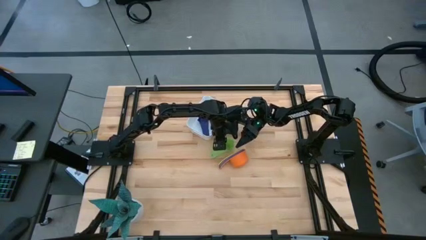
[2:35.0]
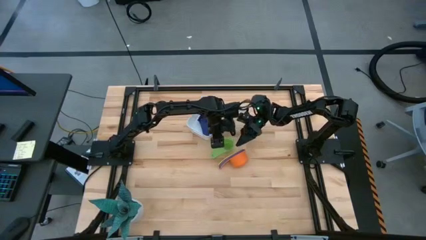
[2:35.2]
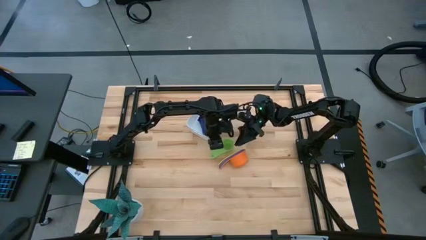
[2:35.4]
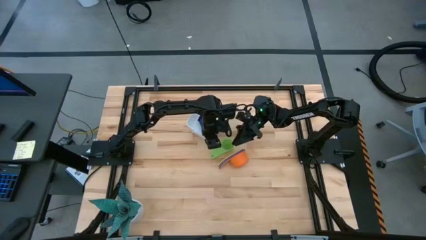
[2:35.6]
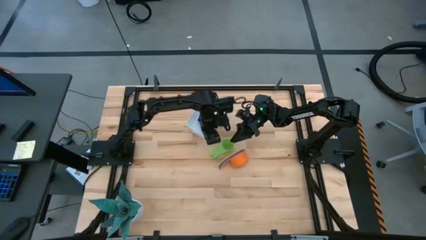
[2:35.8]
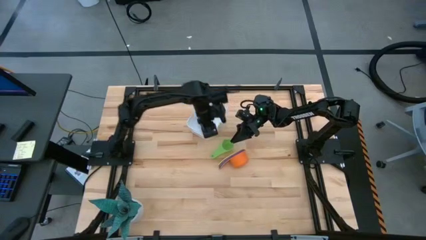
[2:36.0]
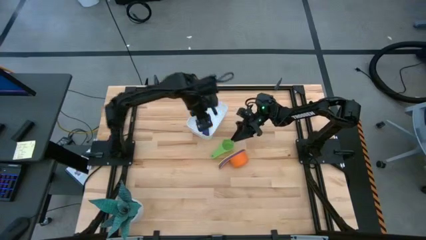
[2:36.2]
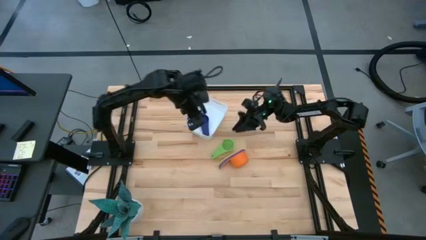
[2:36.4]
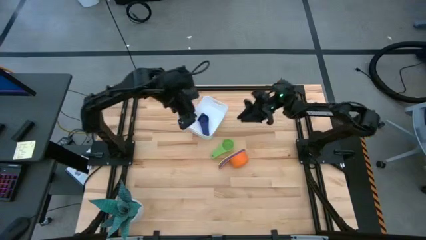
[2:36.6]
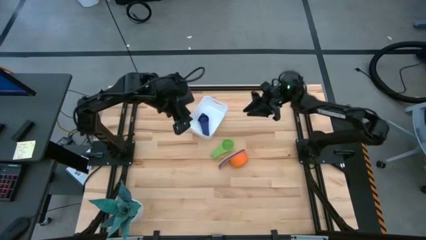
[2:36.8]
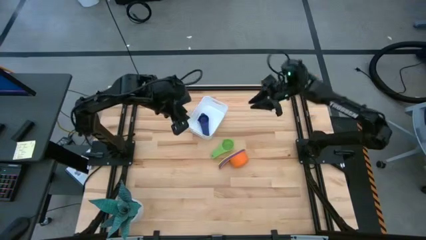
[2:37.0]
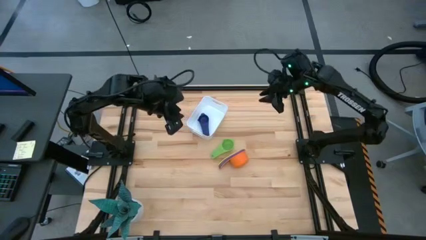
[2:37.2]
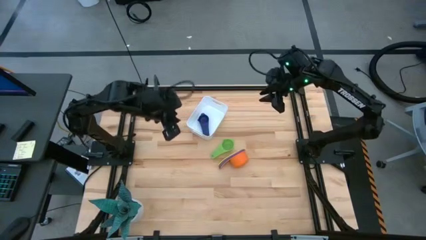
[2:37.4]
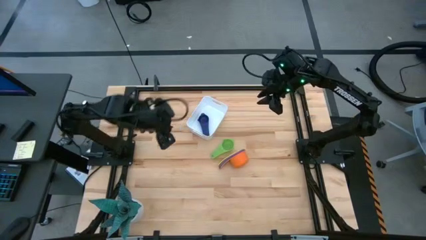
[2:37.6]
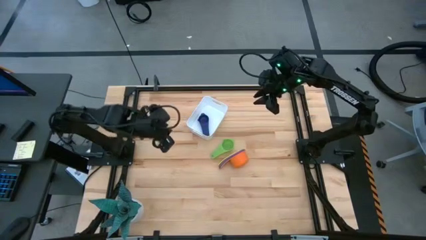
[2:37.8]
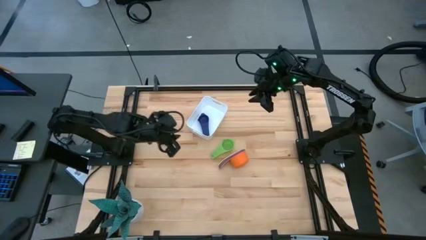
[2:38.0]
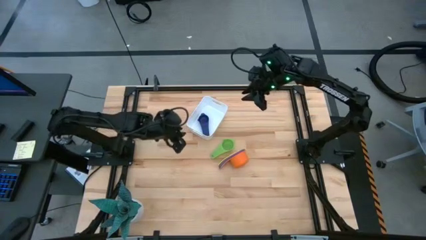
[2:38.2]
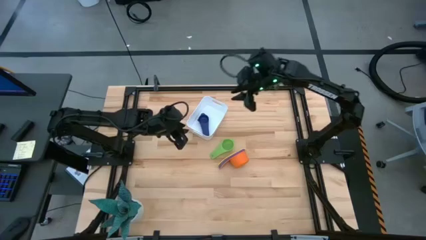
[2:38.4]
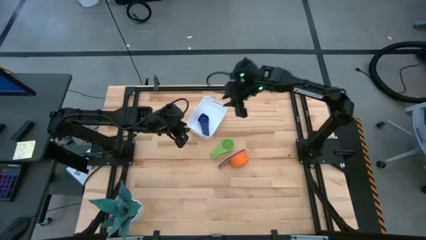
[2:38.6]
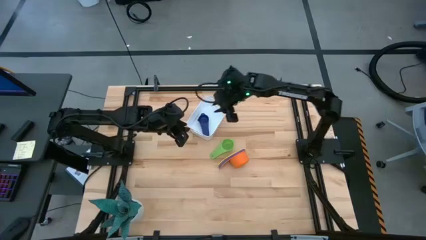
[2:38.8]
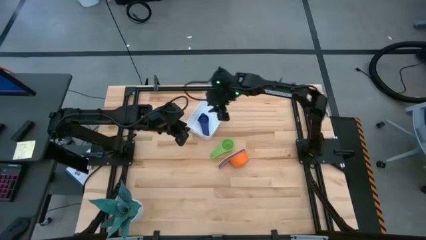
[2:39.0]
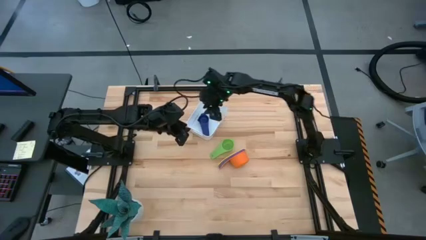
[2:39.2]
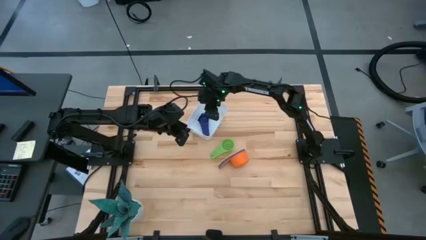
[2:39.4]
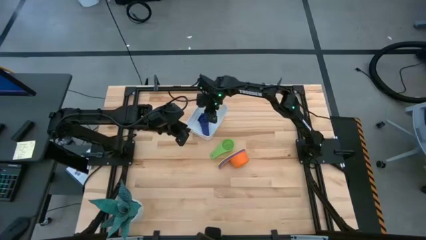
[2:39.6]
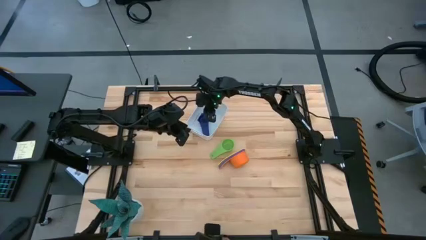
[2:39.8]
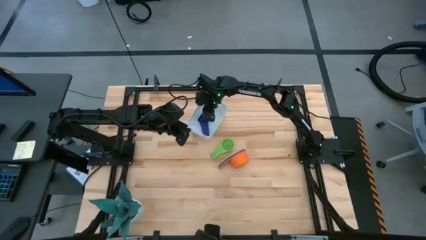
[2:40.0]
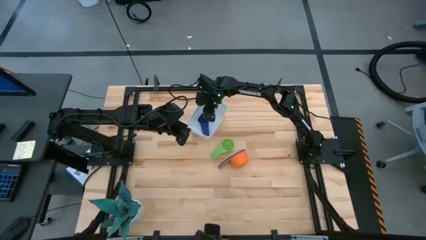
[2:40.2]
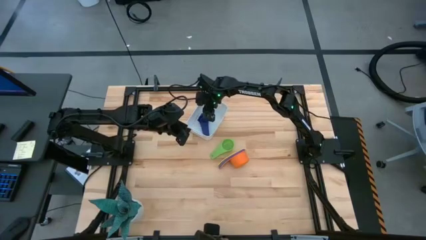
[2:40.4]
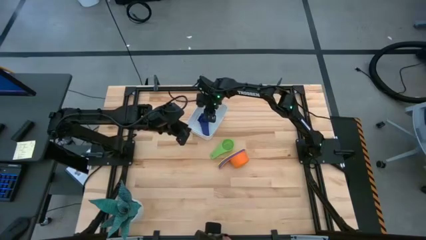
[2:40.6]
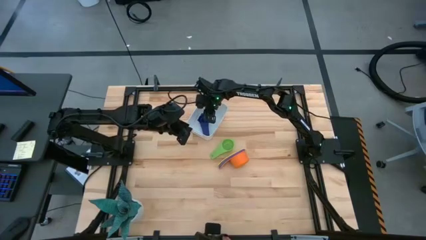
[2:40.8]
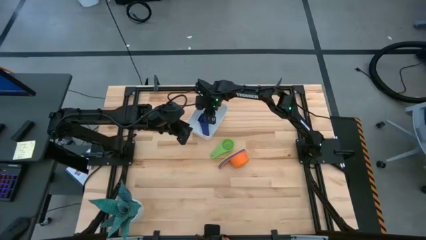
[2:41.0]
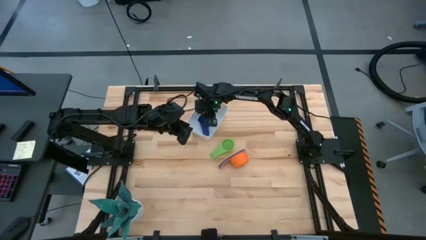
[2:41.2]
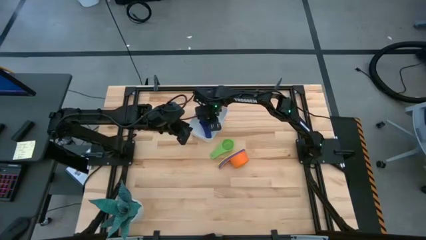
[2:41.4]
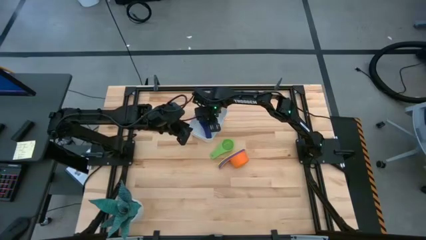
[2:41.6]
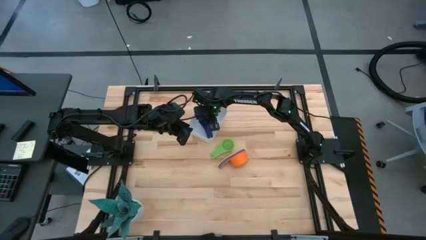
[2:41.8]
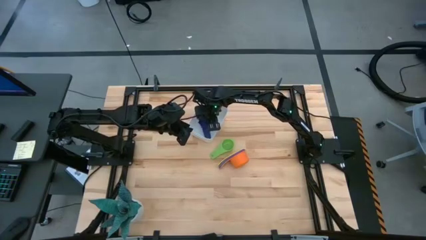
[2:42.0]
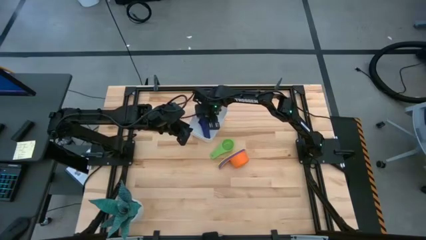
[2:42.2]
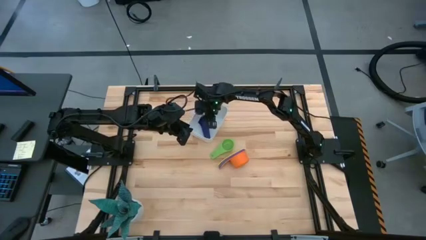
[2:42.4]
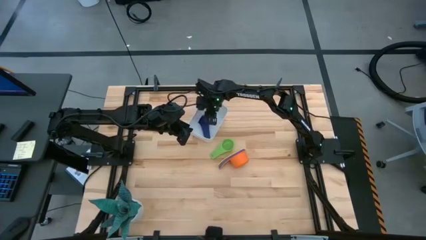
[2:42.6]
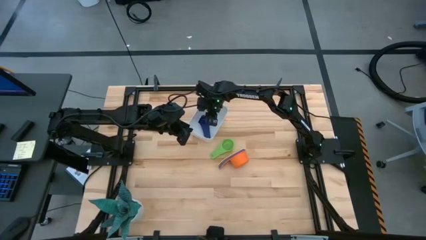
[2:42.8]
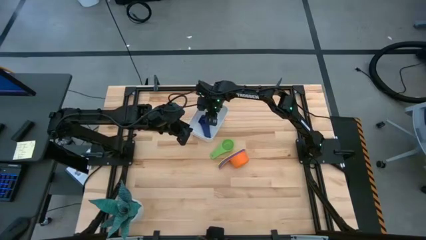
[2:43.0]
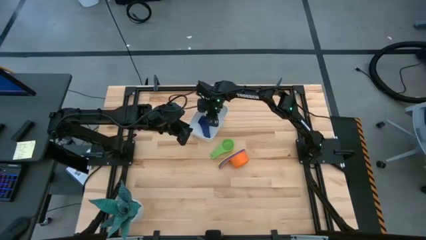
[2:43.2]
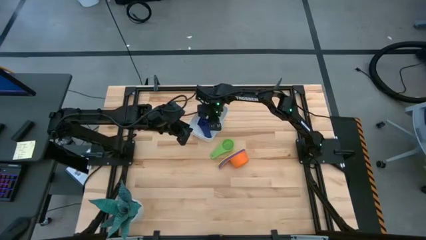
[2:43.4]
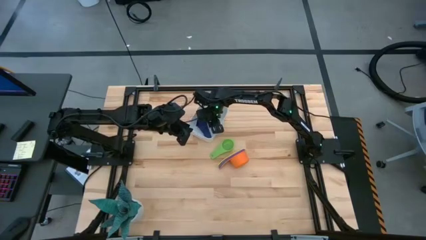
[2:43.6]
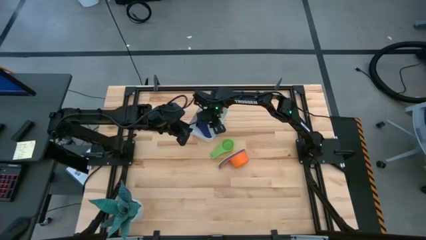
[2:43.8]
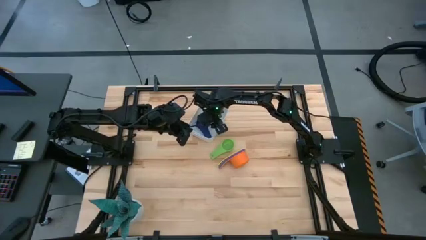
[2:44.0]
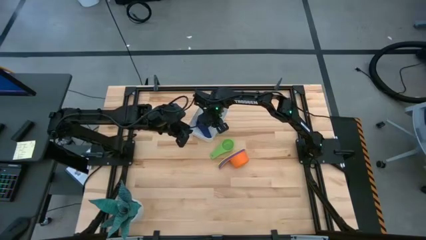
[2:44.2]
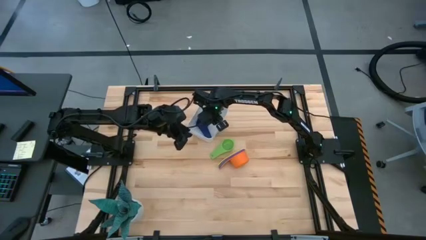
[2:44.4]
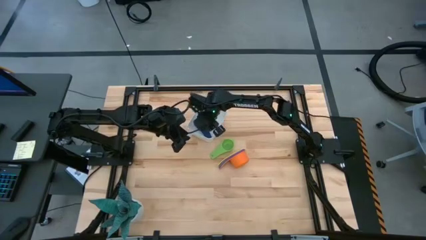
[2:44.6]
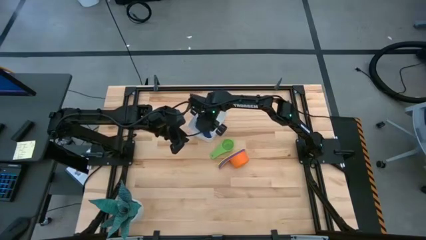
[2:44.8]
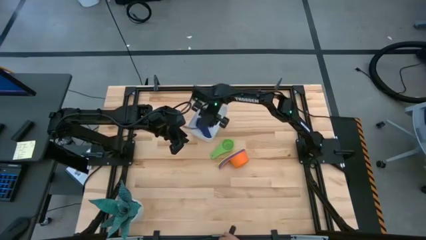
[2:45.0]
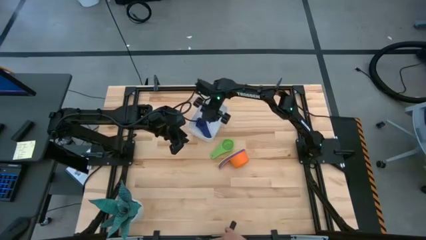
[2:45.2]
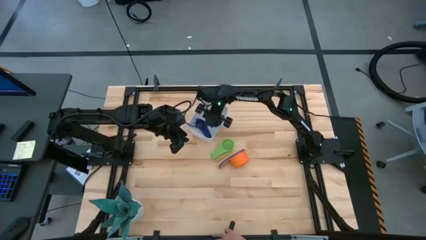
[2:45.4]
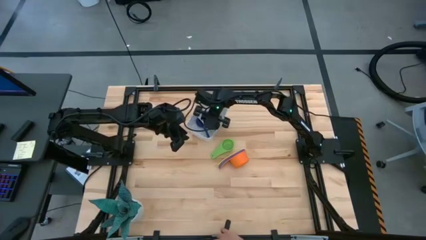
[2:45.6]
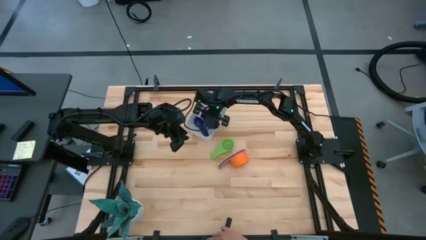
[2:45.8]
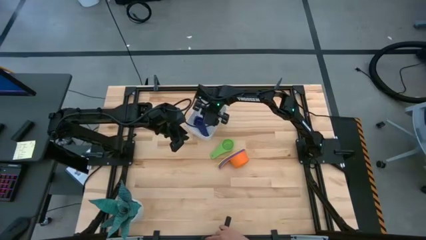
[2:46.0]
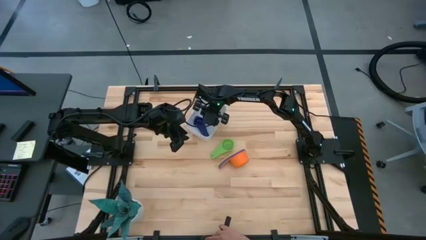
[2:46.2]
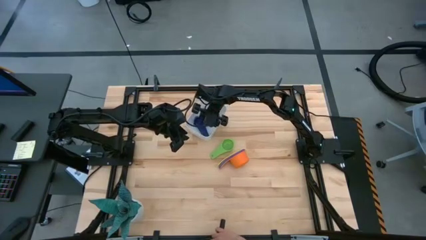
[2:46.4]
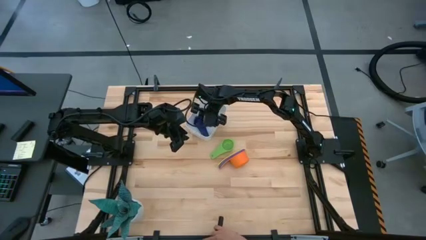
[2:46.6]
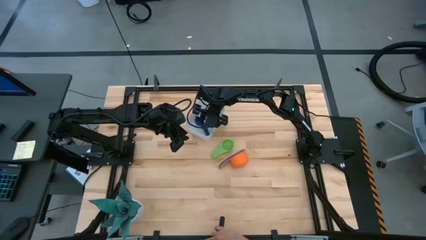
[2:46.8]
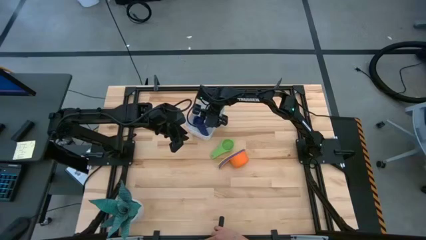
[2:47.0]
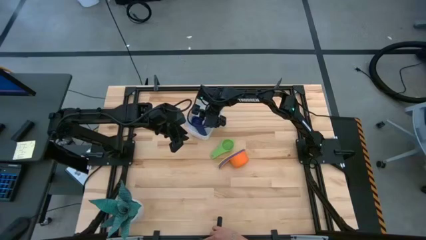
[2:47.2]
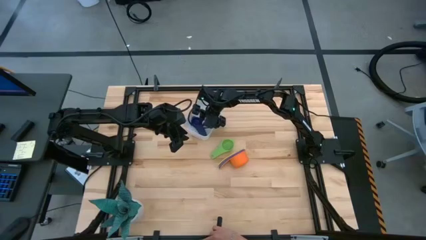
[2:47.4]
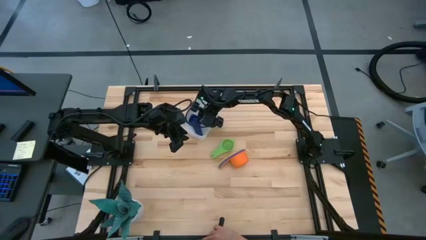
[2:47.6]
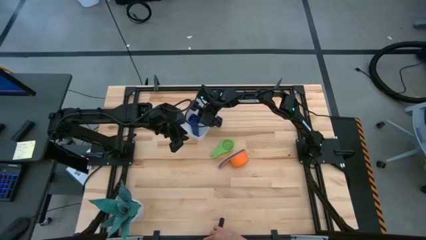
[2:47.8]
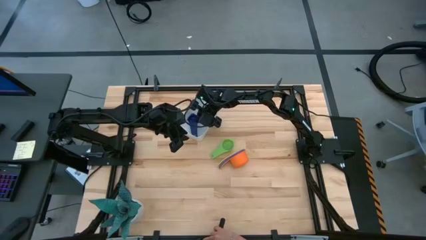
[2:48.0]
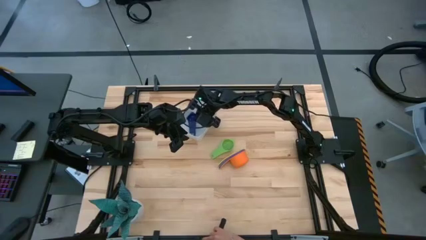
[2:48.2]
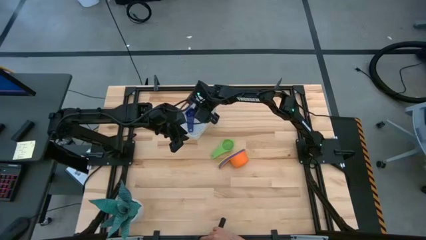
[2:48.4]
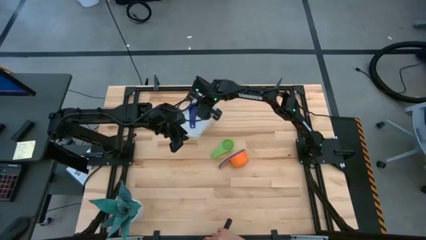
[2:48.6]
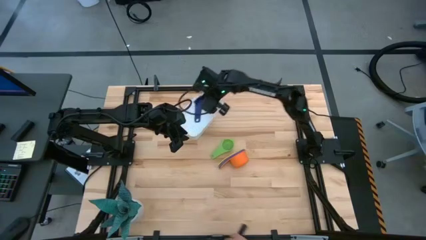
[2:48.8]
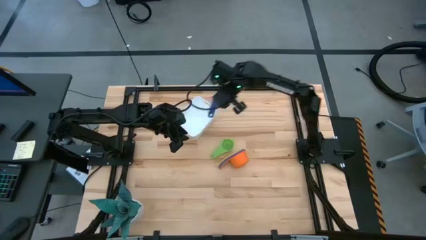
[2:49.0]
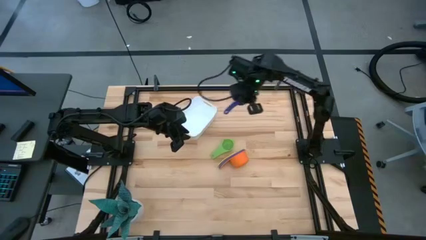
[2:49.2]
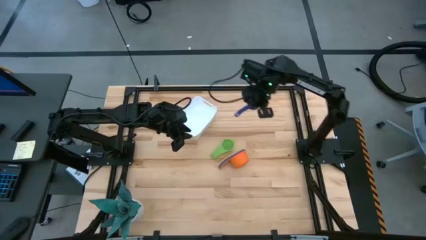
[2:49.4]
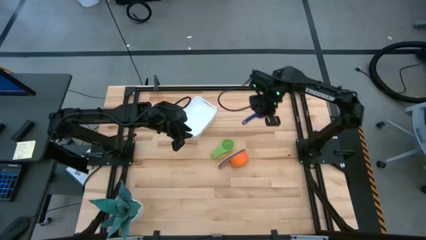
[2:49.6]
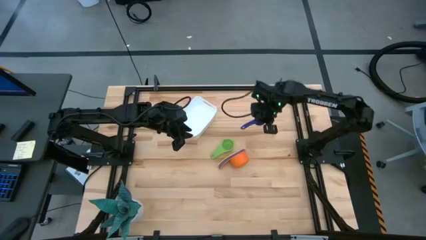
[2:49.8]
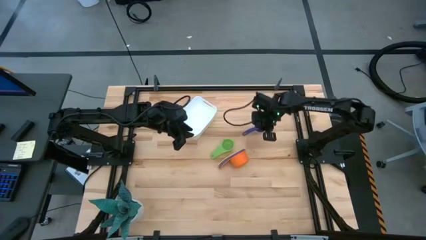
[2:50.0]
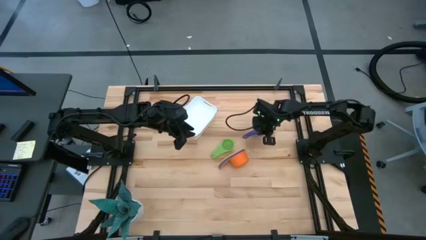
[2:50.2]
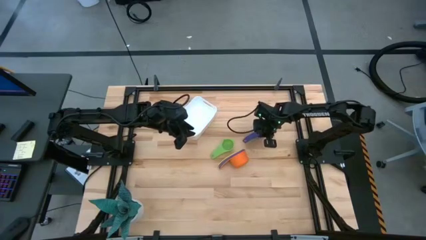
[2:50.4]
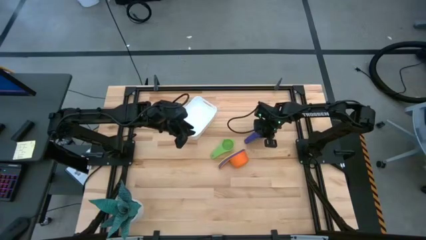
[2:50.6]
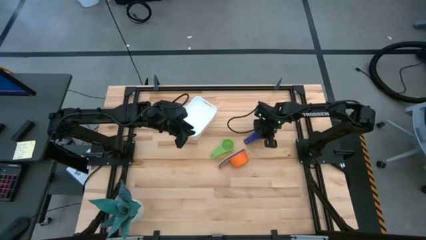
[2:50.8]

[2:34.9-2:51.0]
Task: Nest measuring cups in basket
Remove the dark blue measuring cup from the white bin
